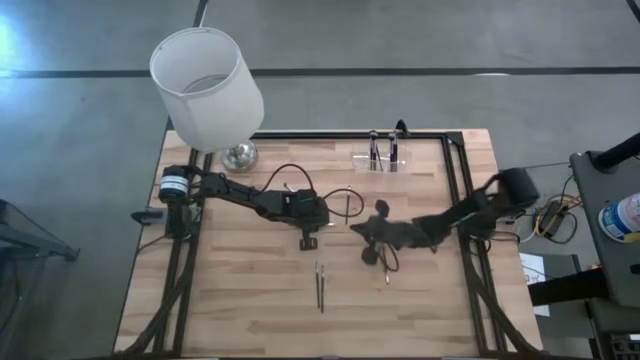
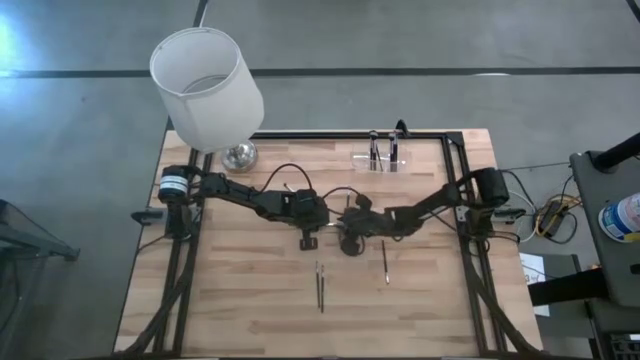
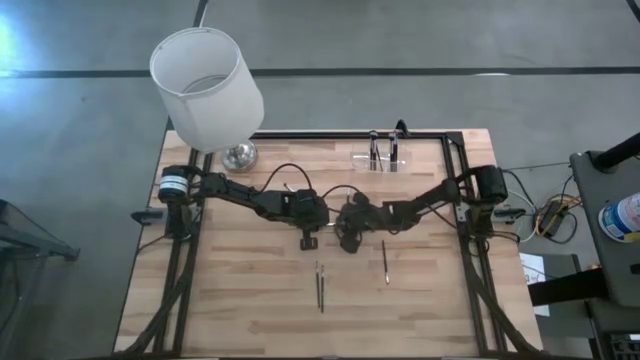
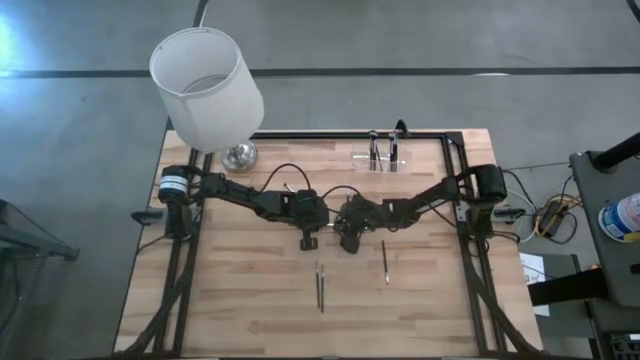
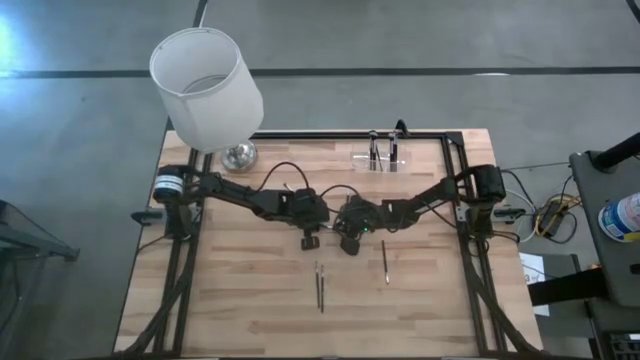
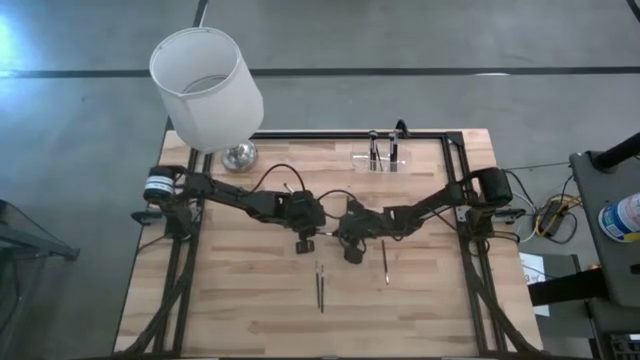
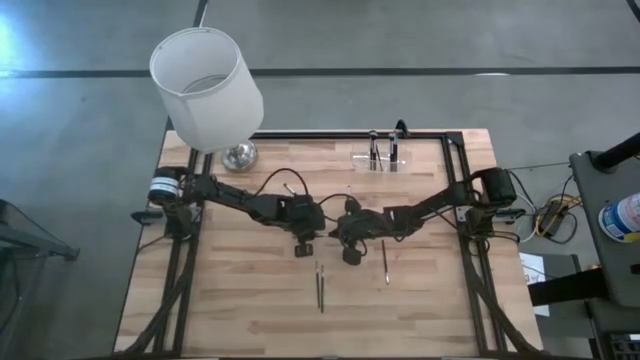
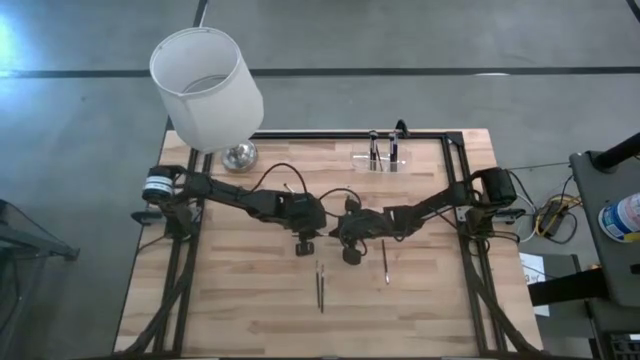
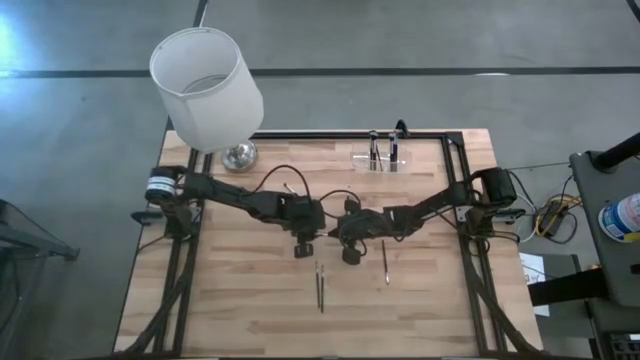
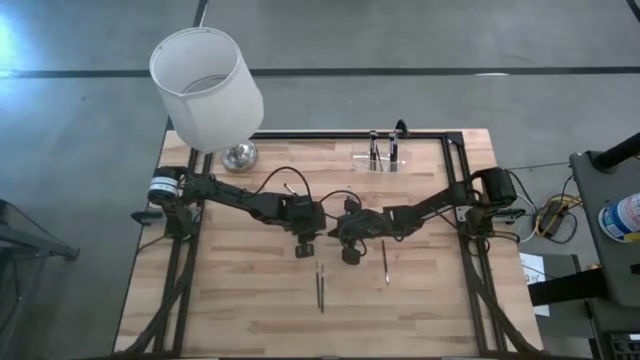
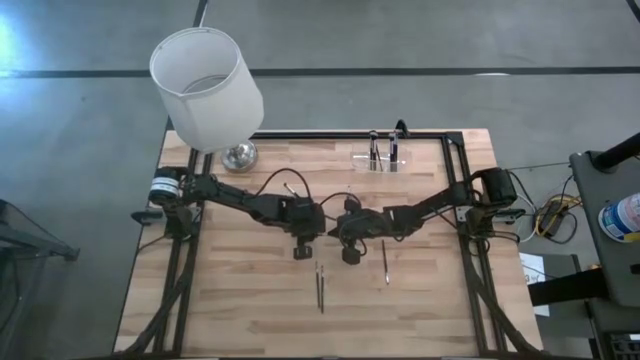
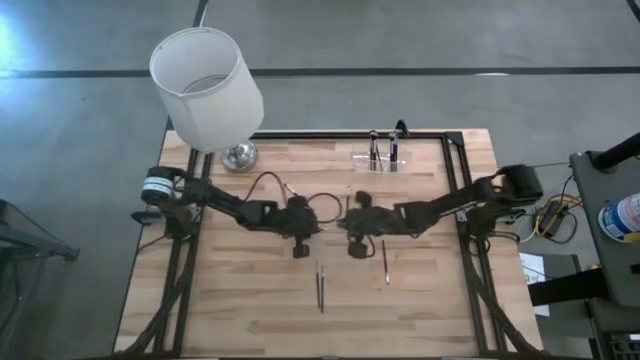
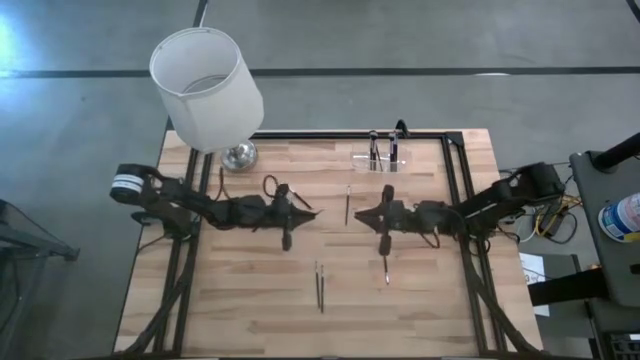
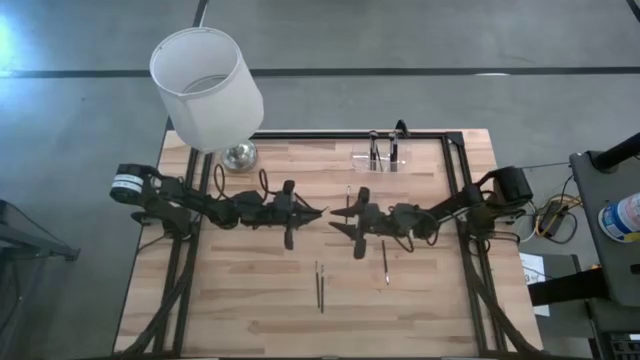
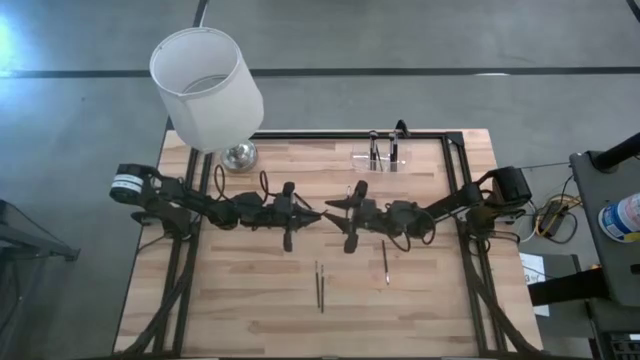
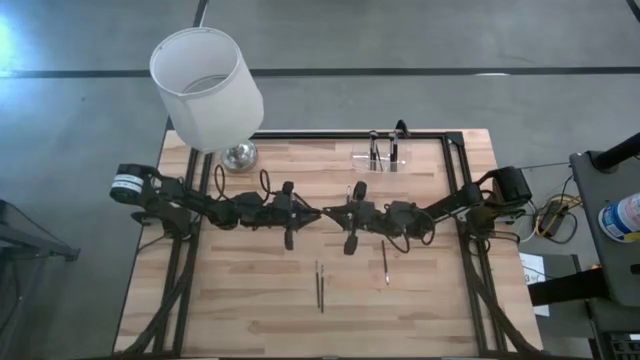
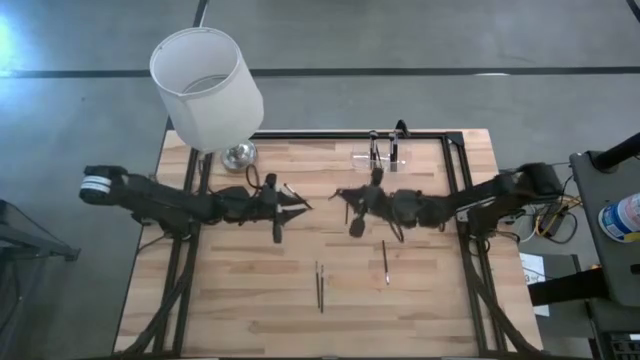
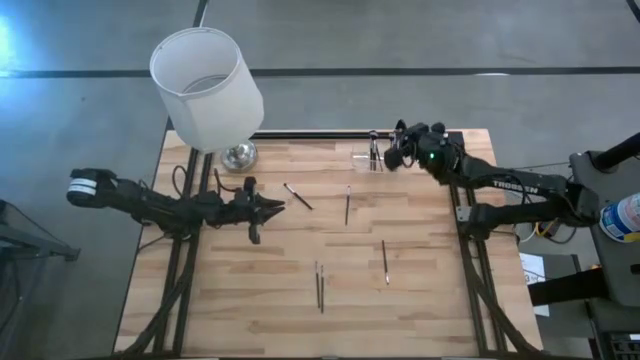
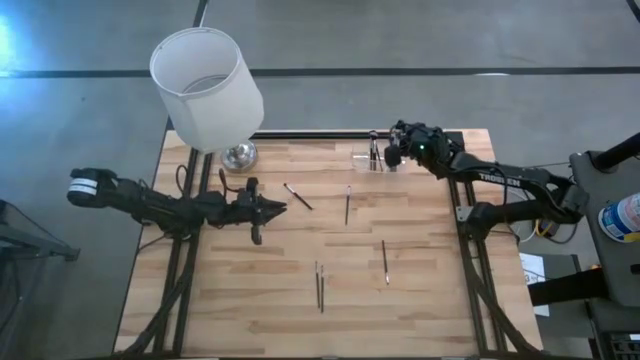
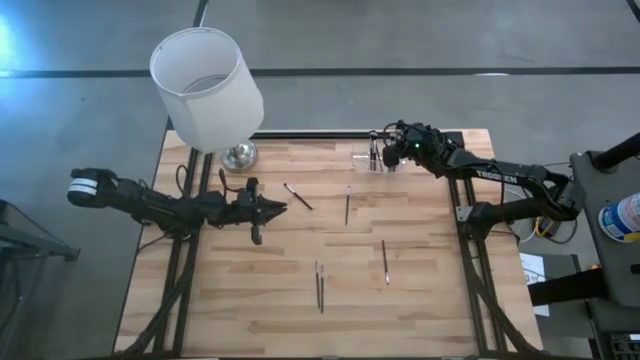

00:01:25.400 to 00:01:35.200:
Task: Put items in baskets/containers
Put the foundation brush into the transparent organizer

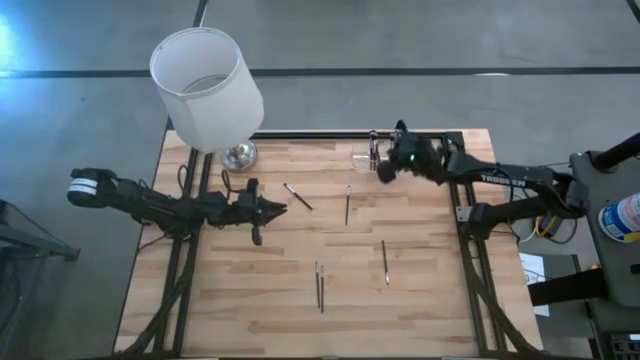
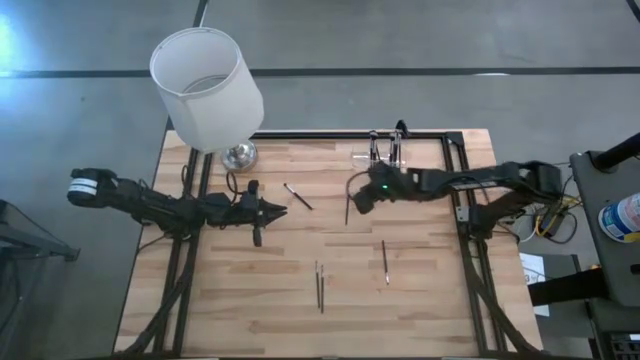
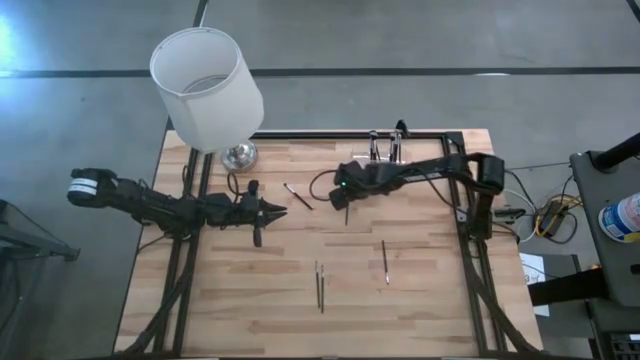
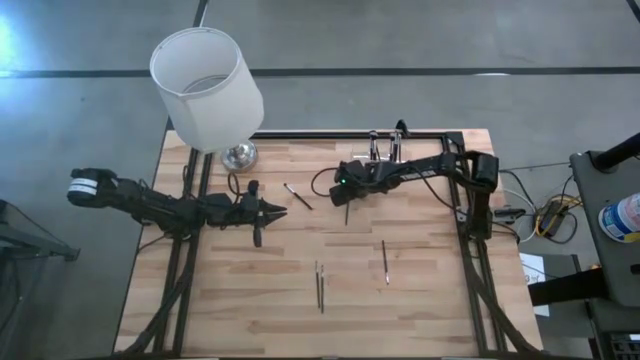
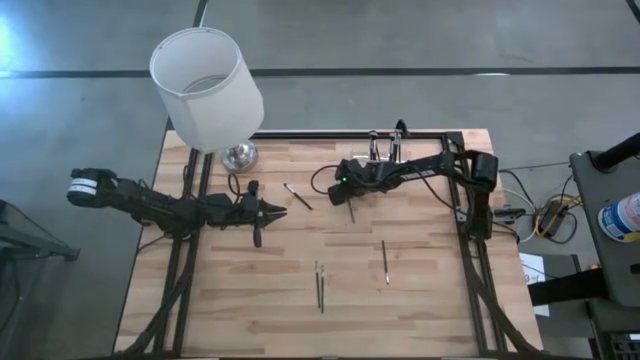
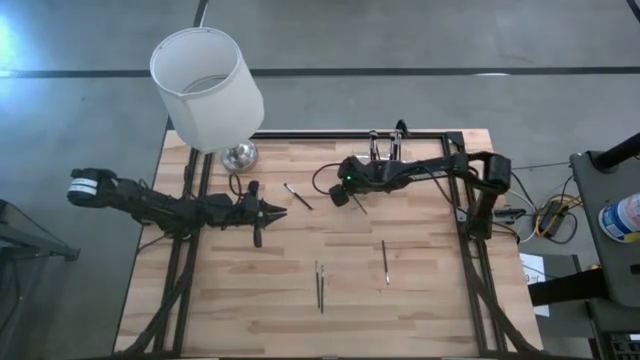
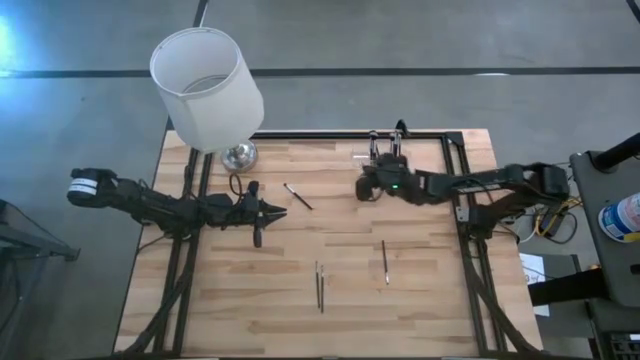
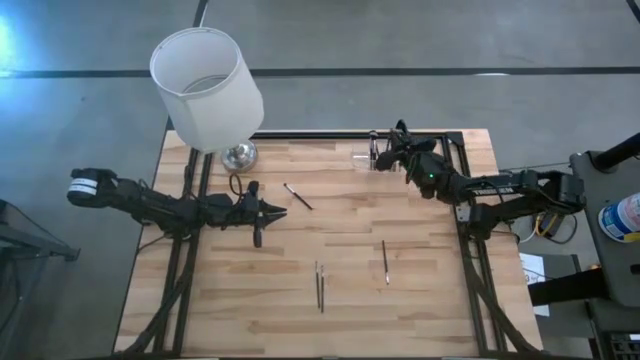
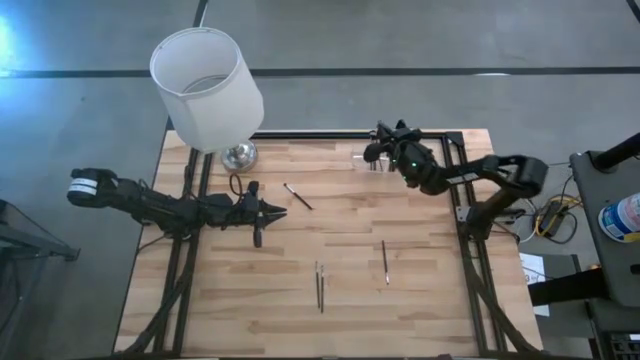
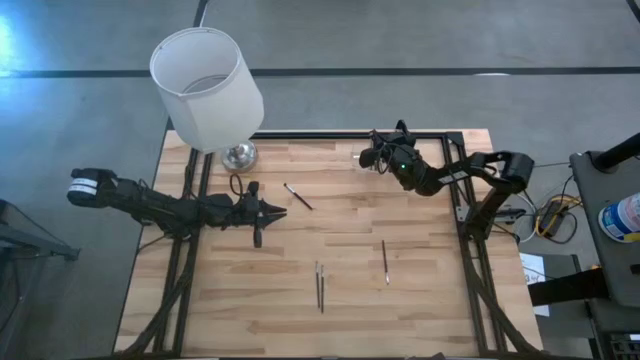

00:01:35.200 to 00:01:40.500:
Put the eyeshadow brush into the transparent organizer

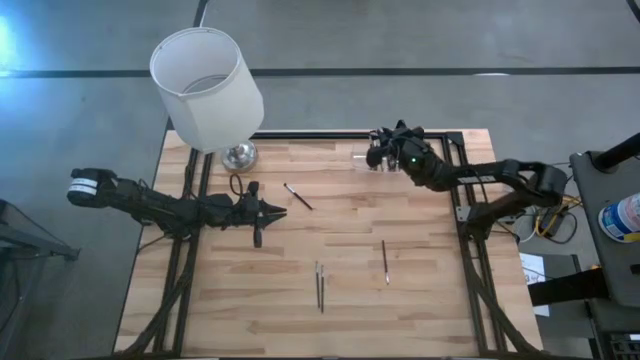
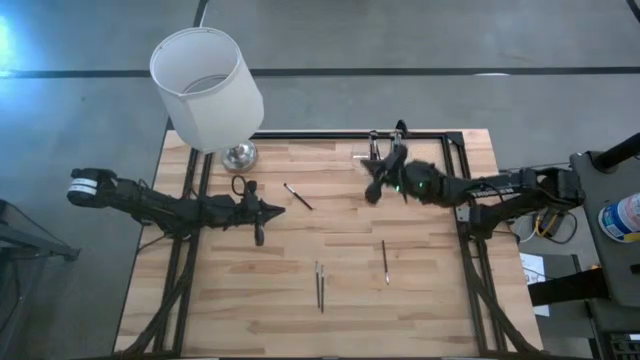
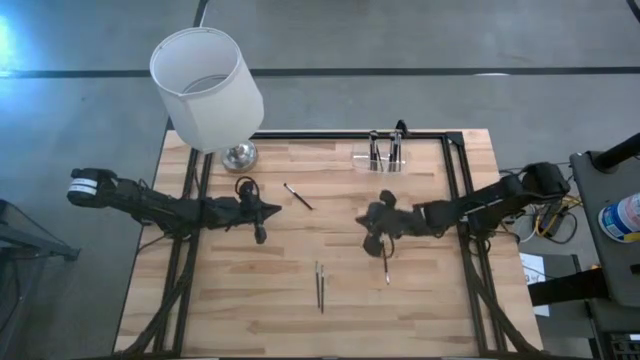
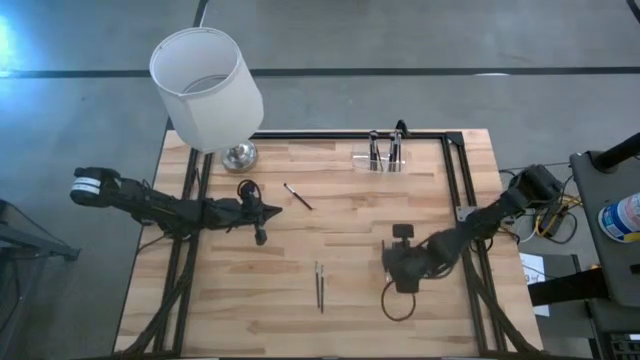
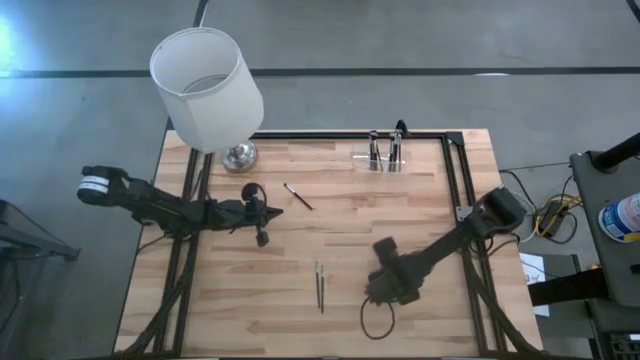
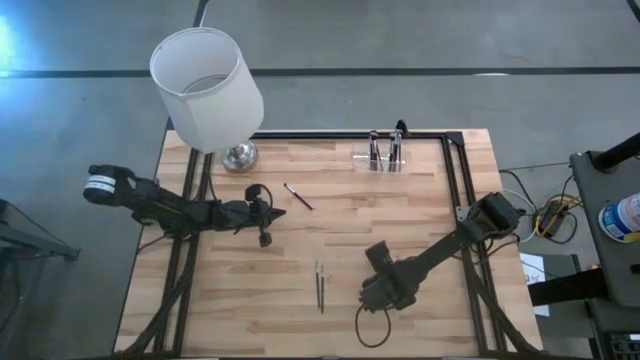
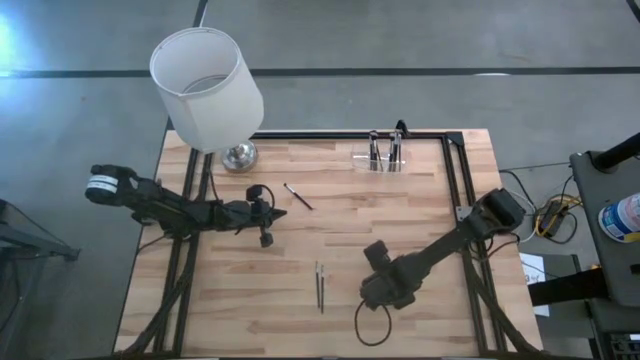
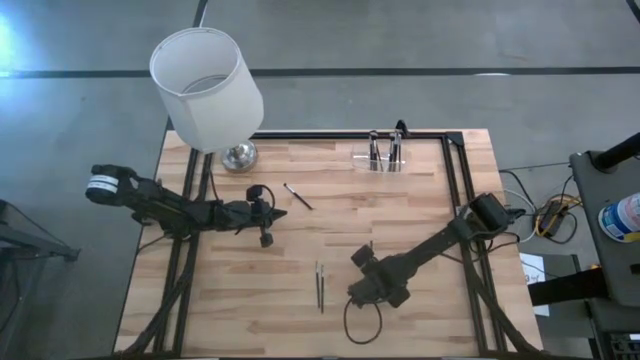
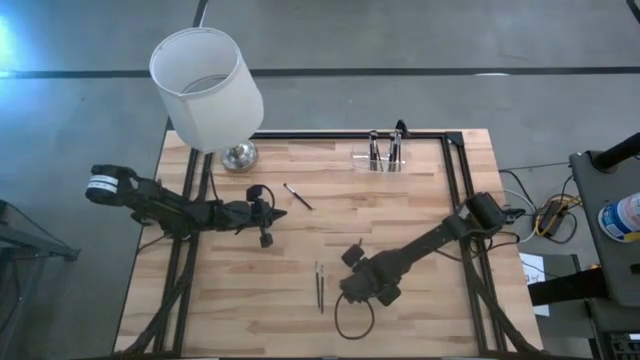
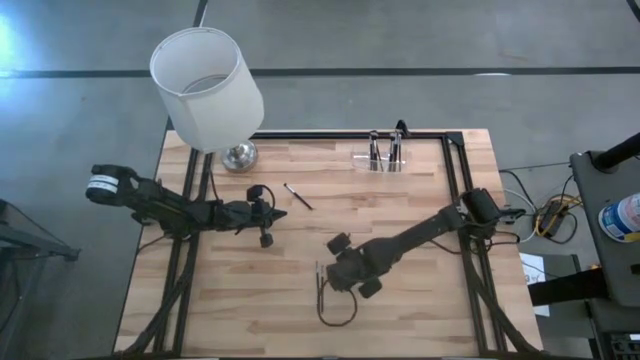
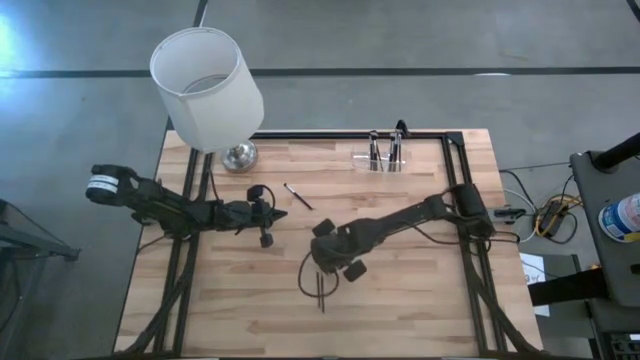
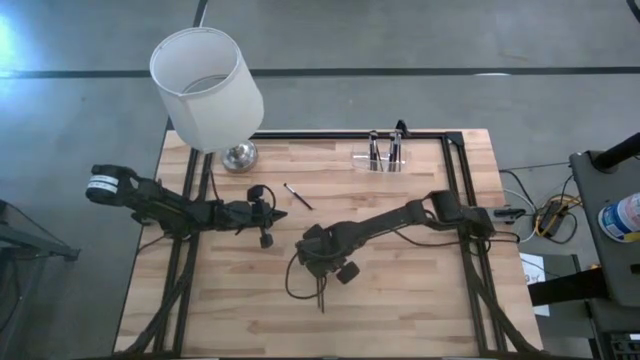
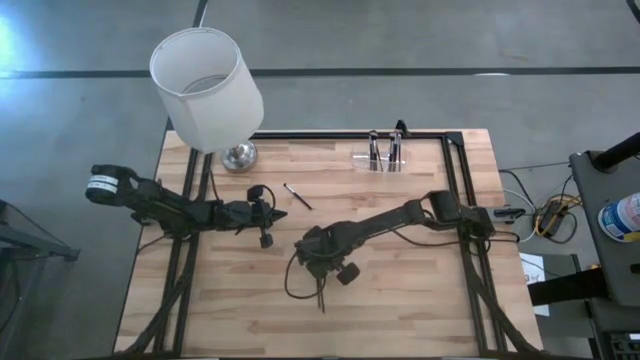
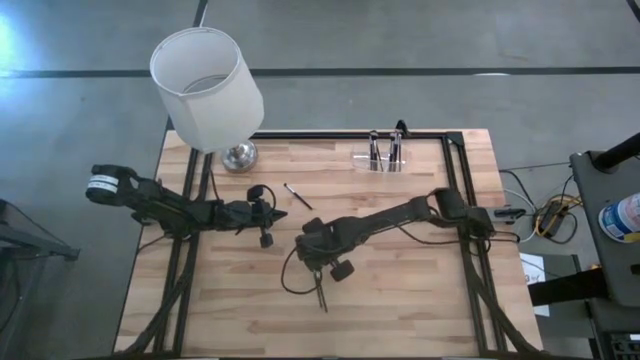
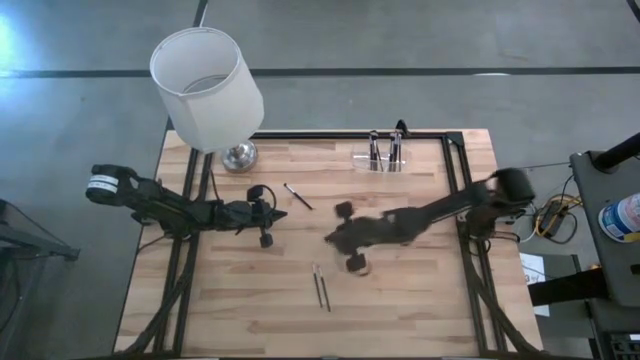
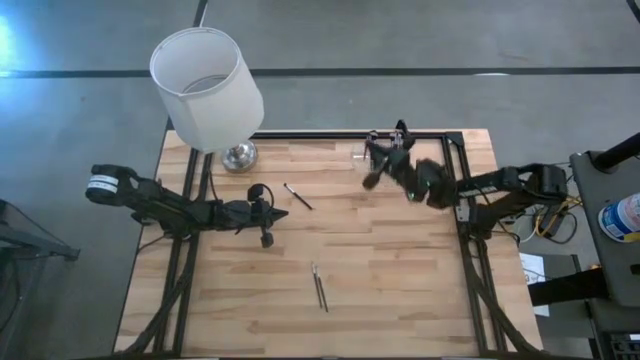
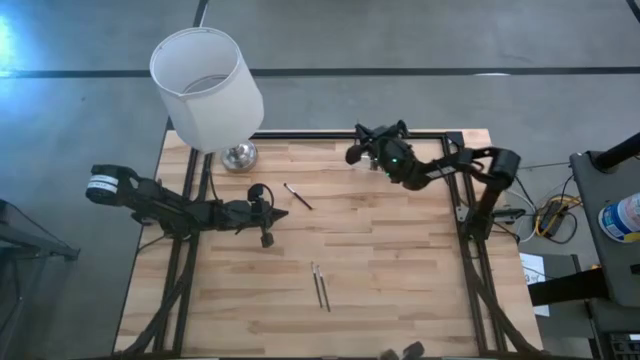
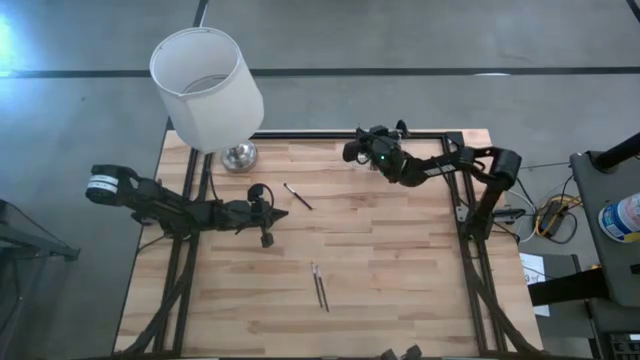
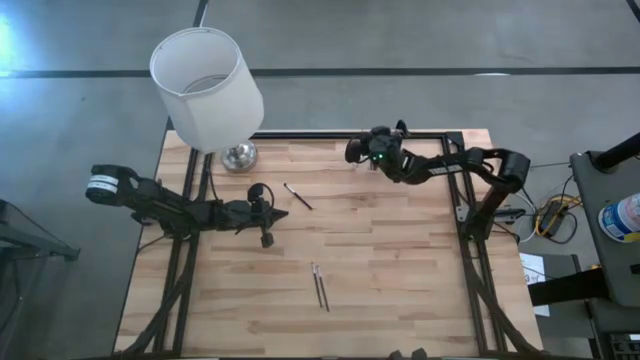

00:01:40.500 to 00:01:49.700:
Put the eyeshadow brush into the transparent organizer
